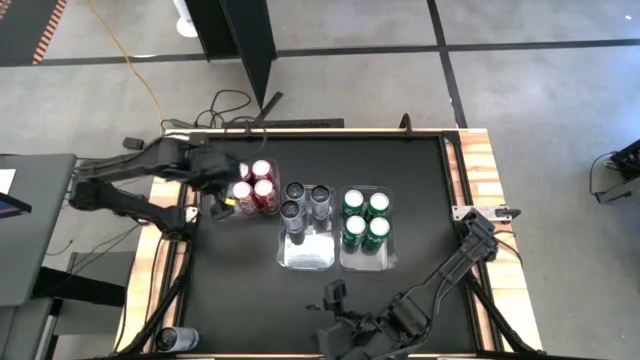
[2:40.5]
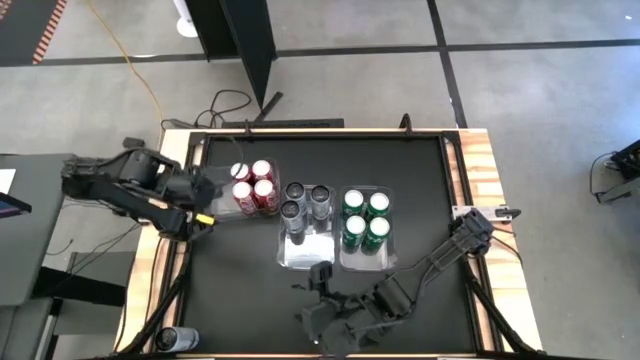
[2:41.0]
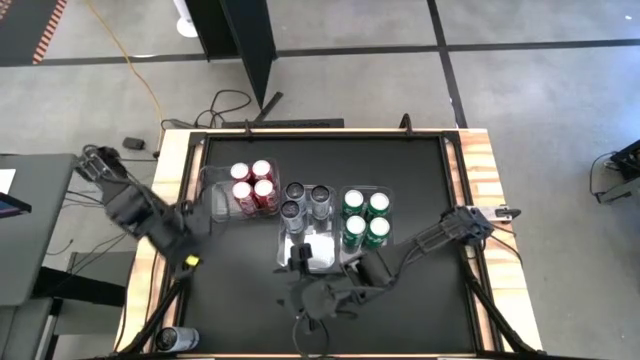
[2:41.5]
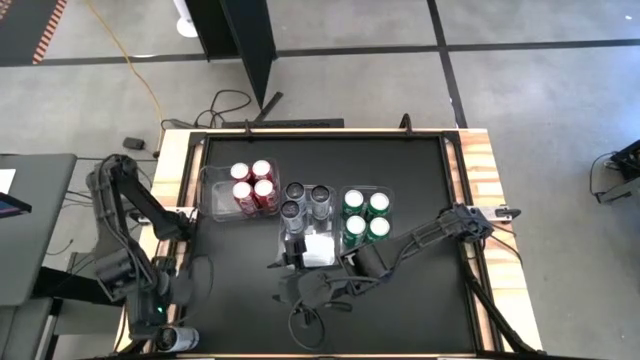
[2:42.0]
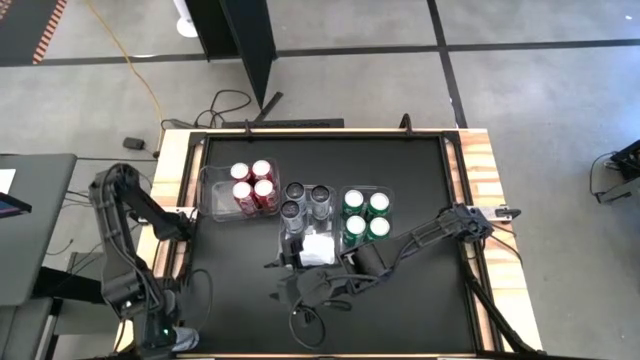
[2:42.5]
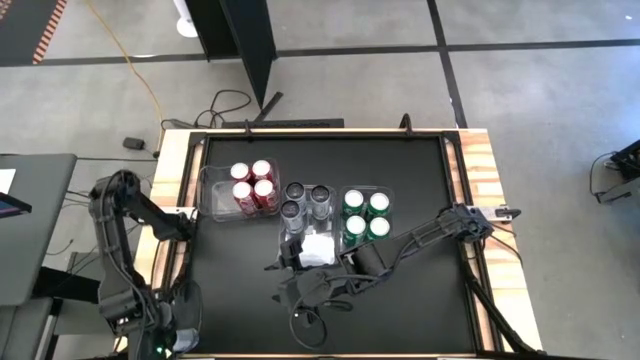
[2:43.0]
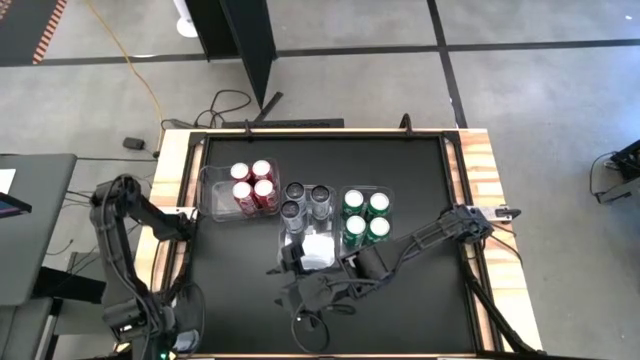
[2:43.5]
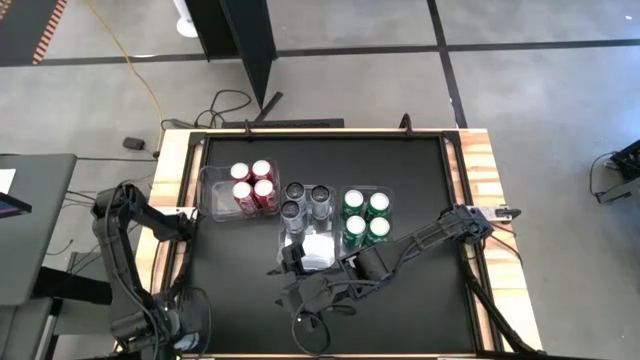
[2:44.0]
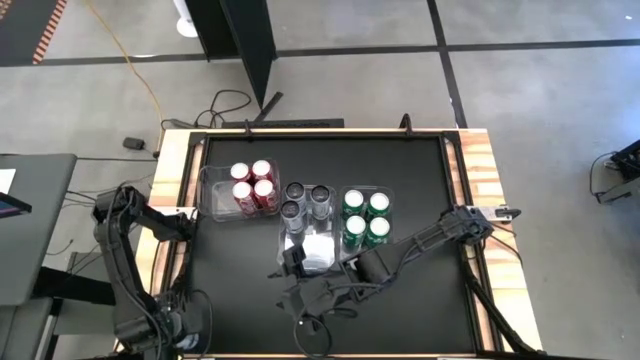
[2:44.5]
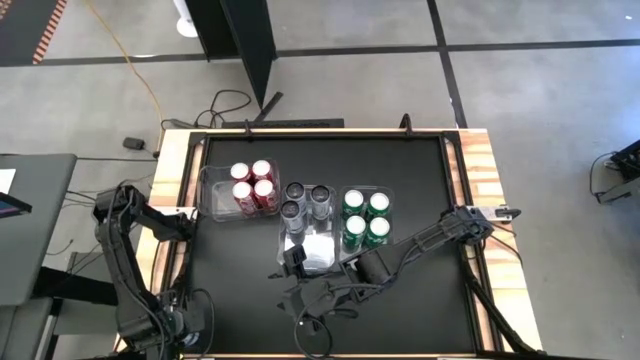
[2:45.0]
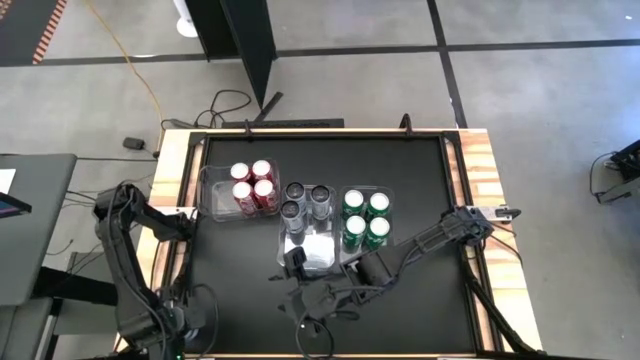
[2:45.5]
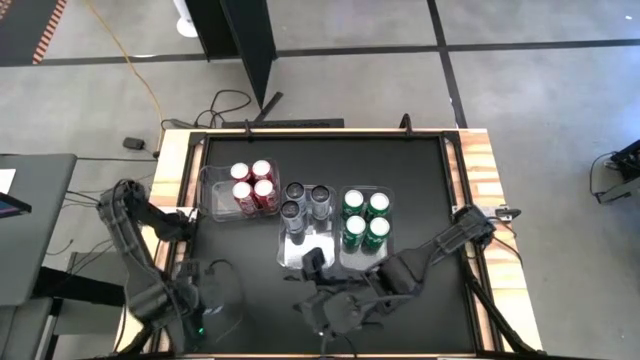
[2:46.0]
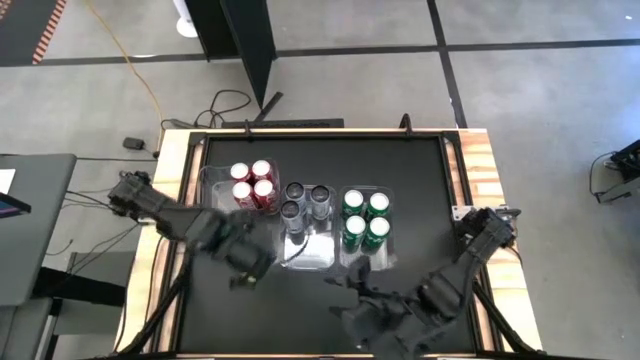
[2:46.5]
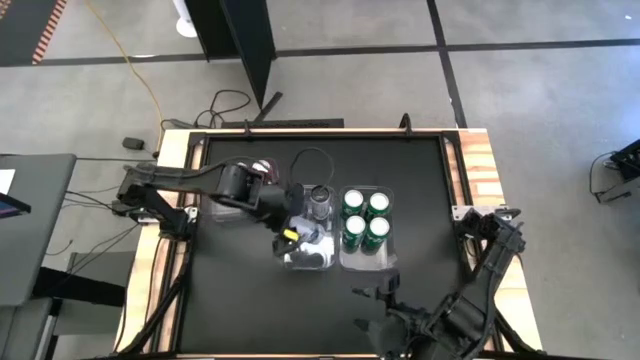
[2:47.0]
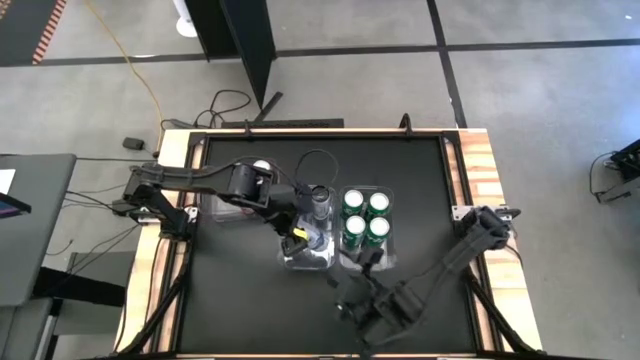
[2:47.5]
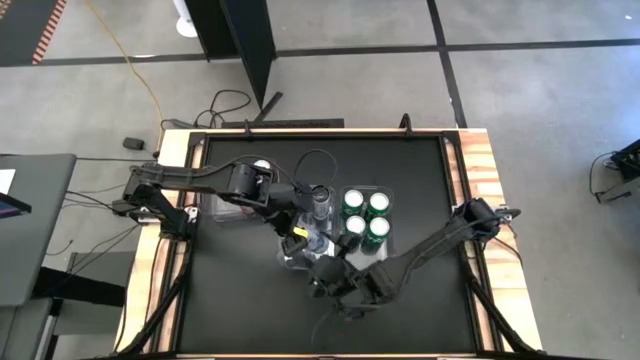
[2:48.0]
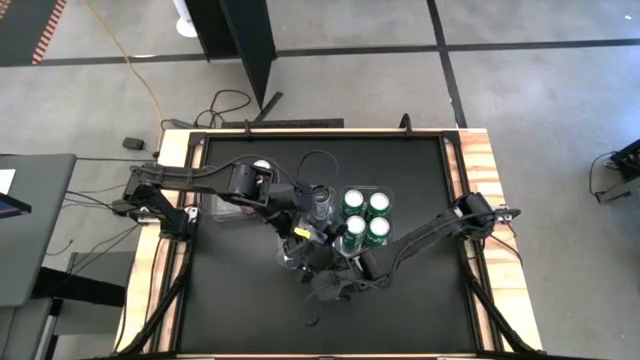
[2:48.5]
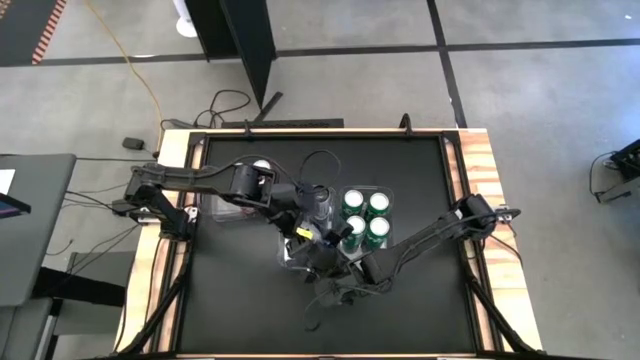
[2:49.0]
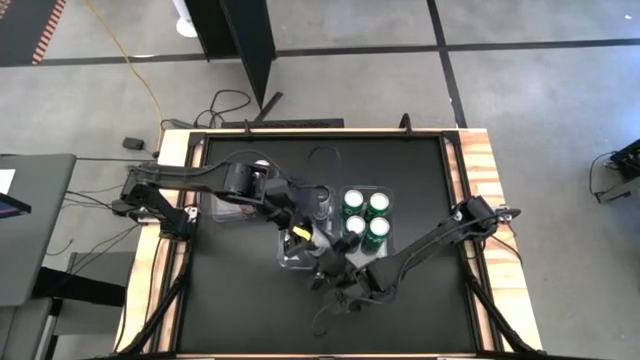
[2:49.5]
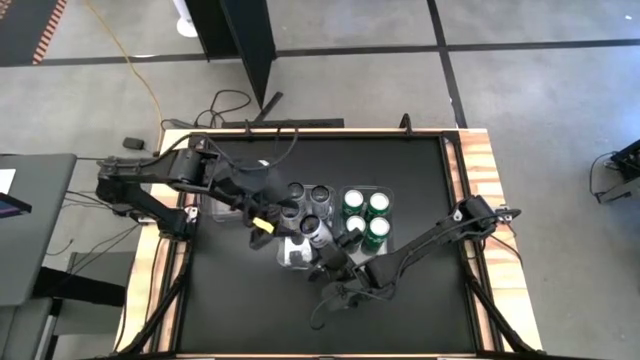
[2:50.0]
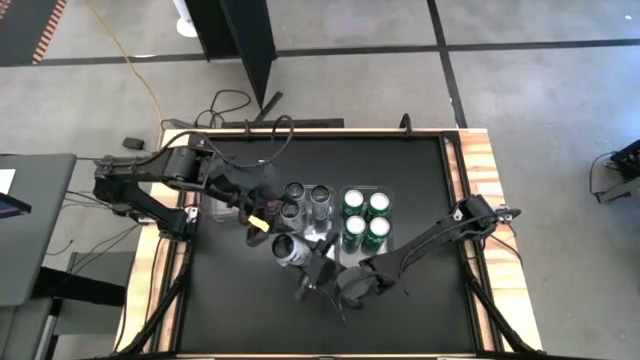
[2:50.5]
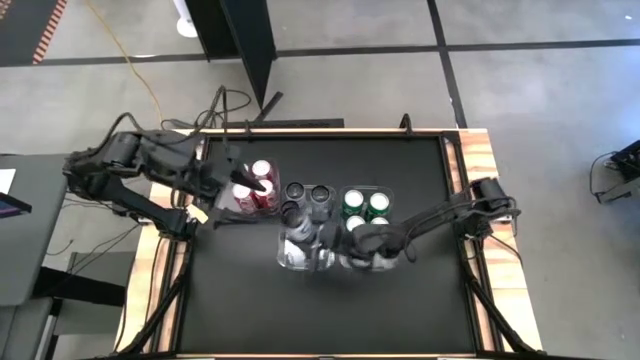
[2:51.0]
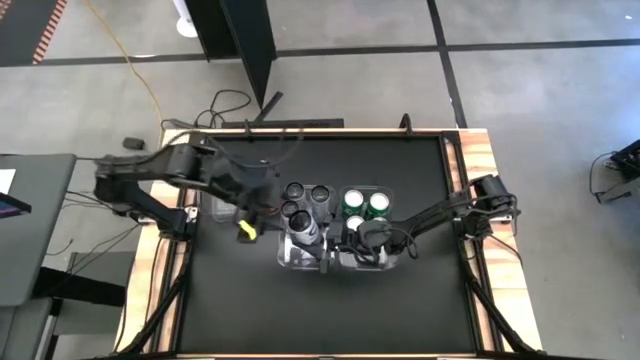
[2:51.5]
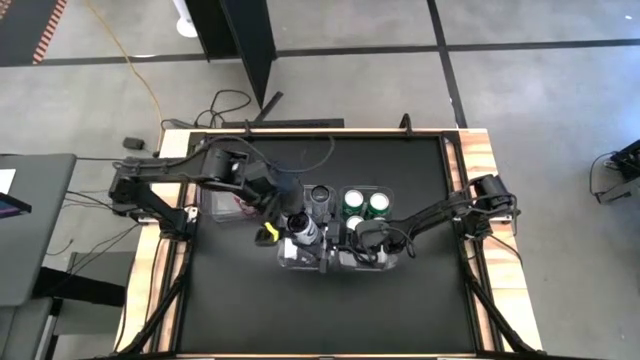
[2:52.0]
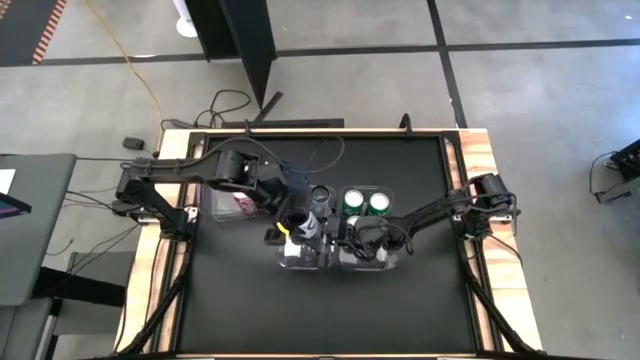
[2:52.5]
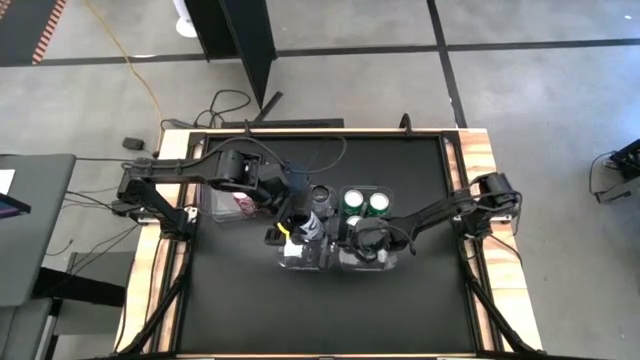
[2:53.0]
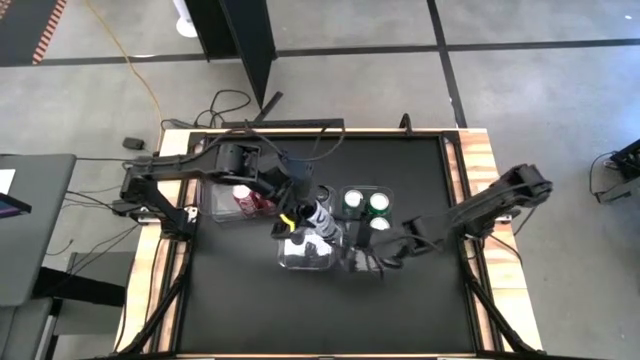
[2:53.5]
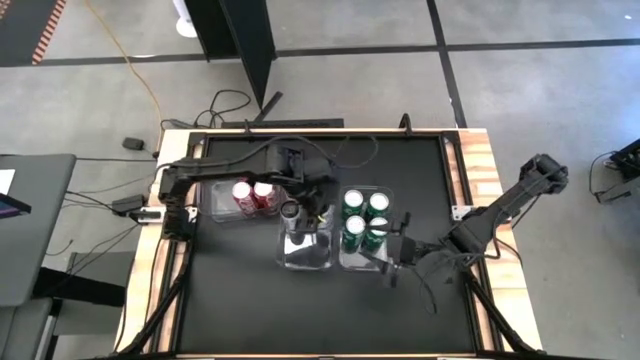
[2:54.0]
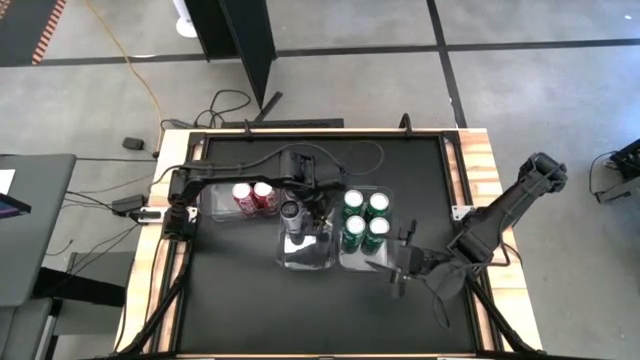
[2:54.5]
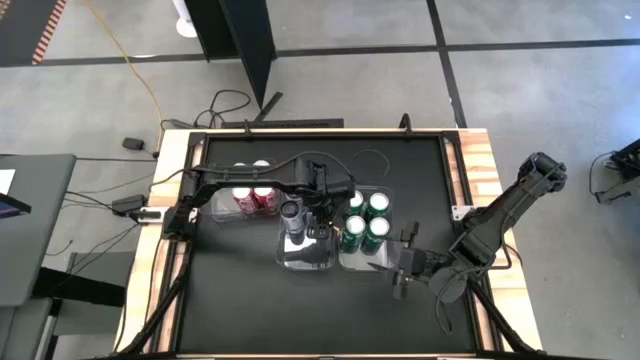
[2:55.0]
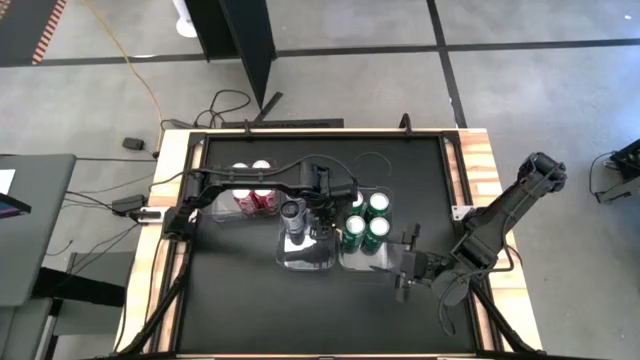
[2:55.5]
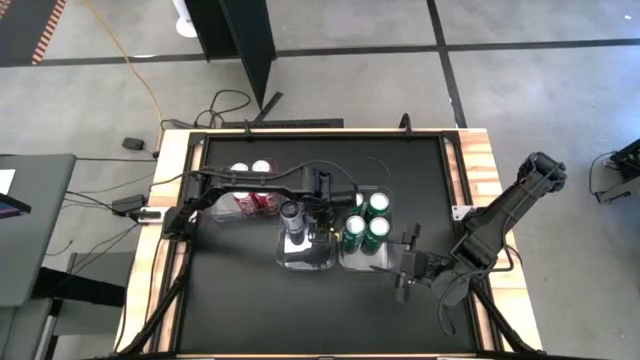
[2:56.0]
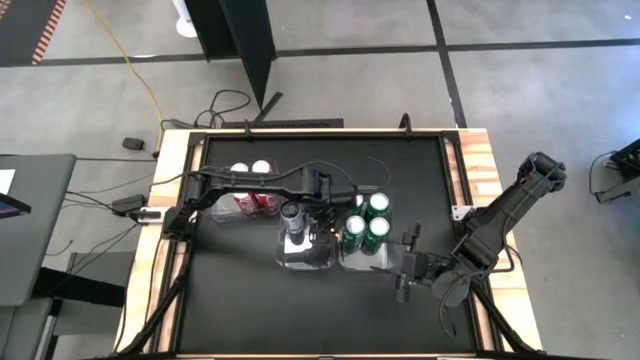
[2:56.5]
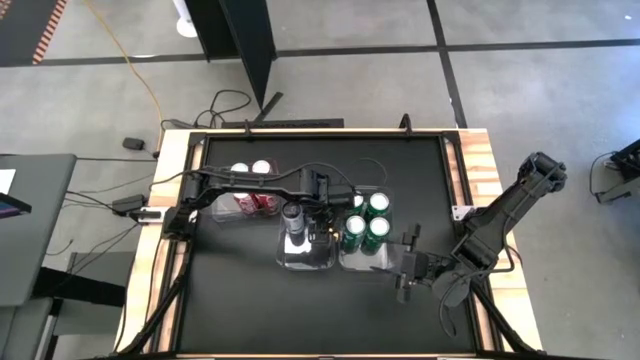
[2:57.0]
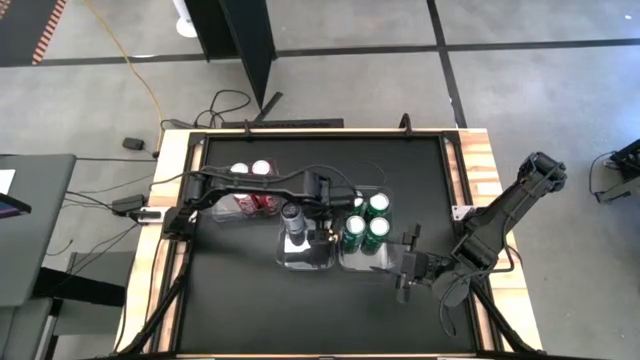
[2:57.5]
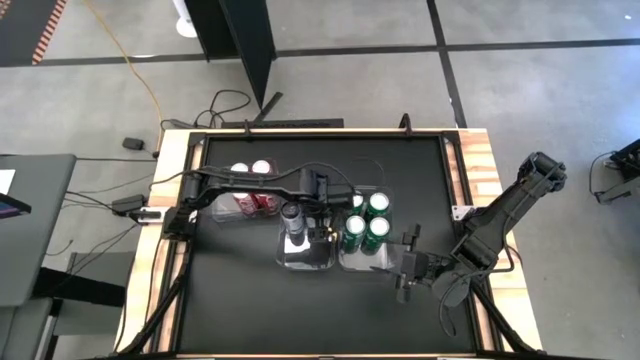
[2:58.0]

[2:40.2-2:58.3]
Task: Sort soda cans
Put the white and blue soda can into the center transparent bin

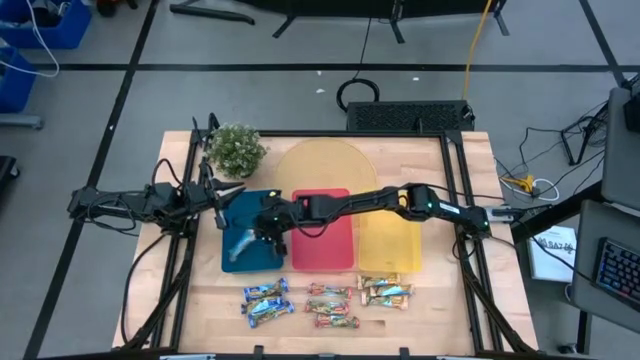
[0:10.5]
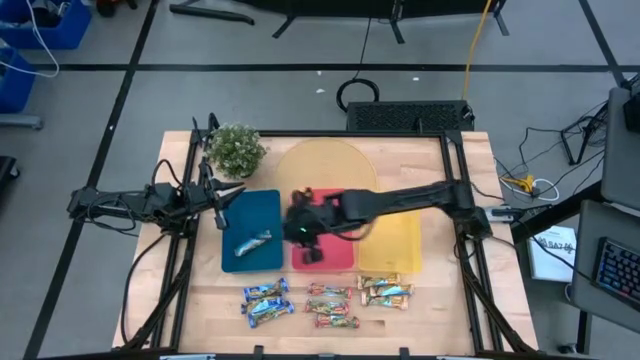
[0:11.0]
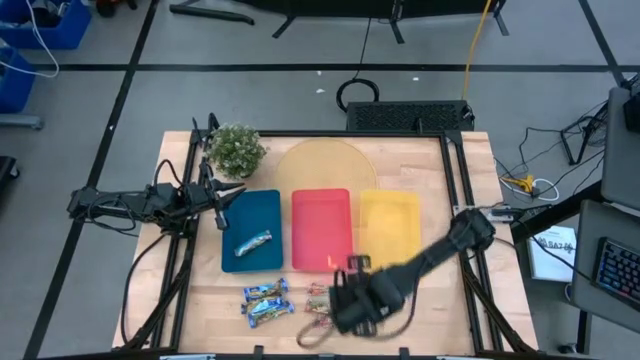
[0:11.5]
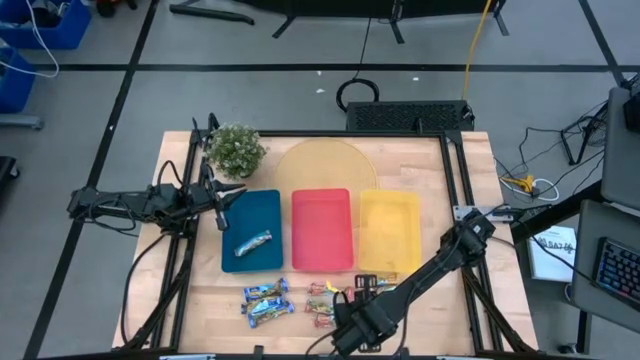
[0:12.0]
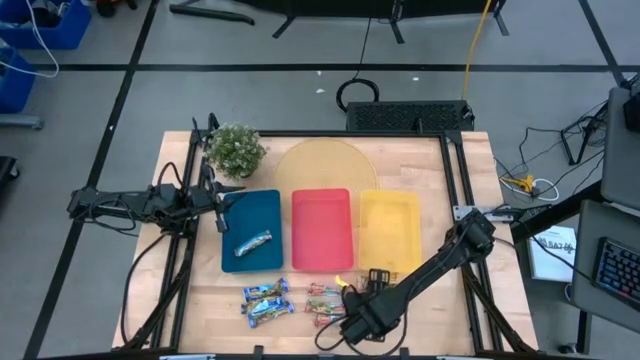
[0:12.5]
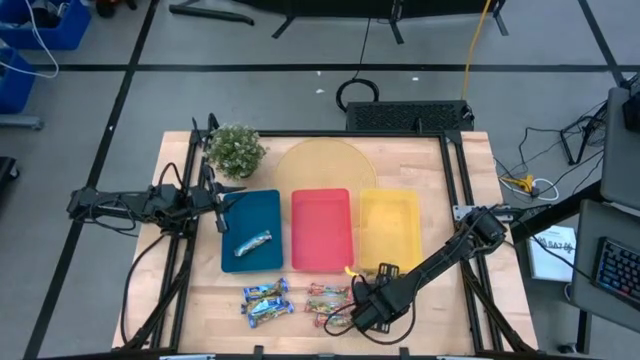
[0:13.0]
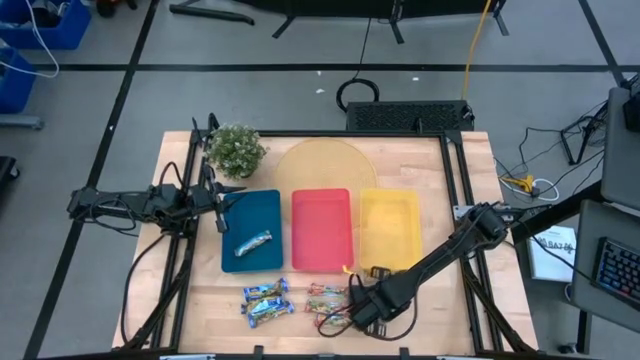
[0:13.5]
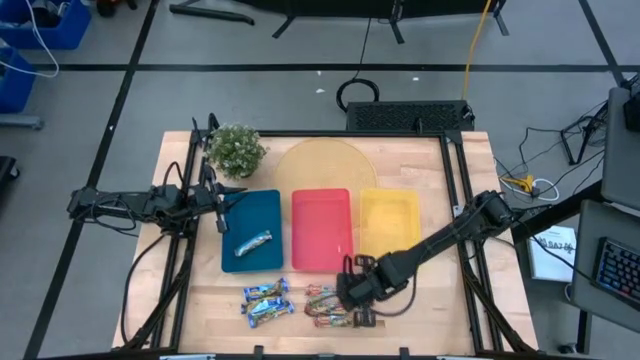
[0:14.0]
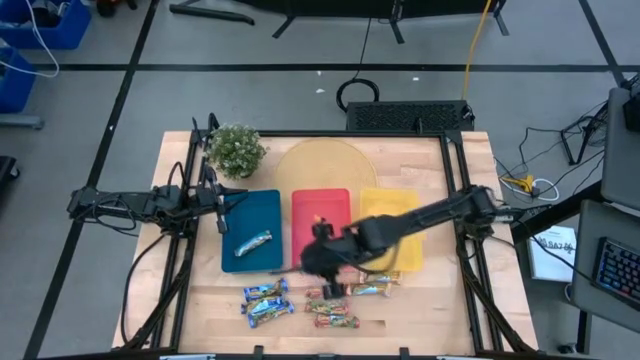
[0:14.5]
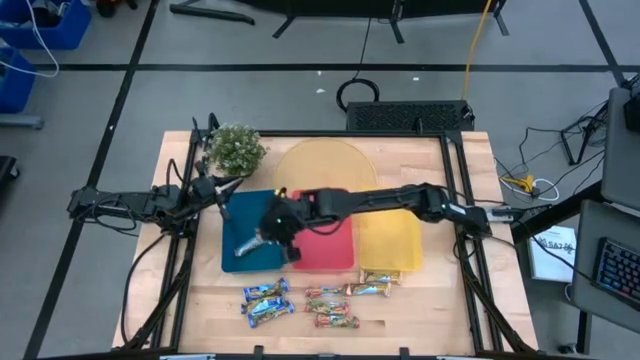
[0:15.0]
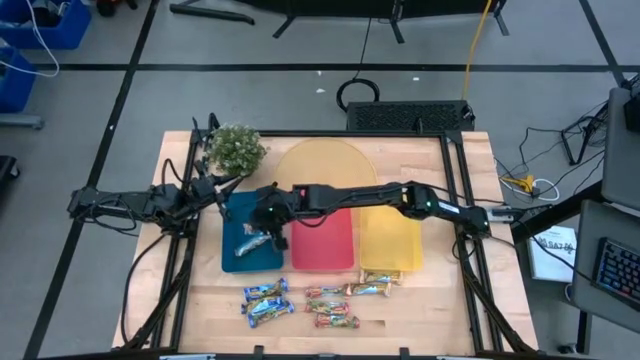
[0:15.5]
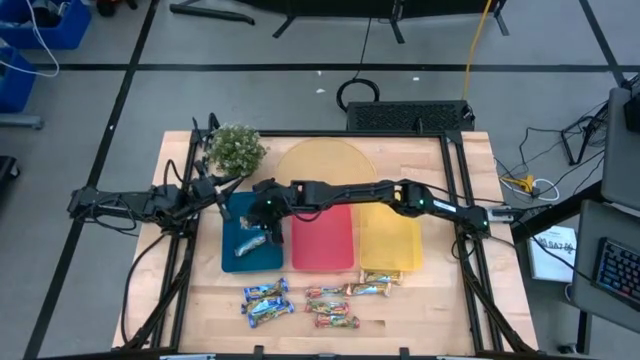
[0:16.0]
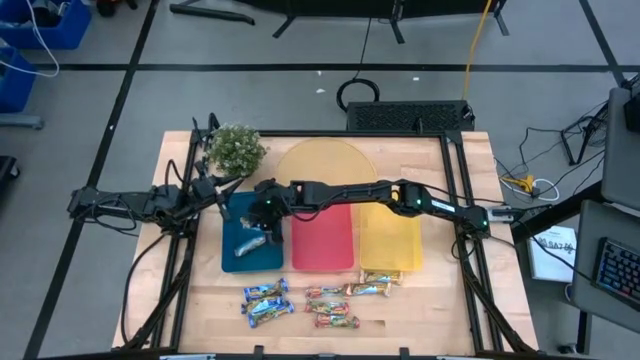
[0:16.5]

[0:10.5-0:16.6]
Task: Pick and place Granola Bars by type
Put the yellow granola bar into the blue bin
